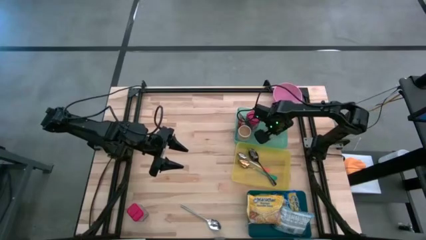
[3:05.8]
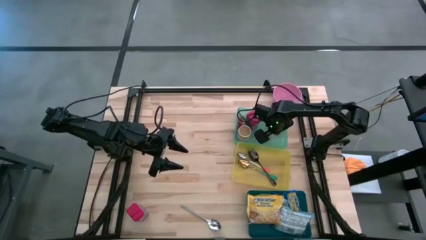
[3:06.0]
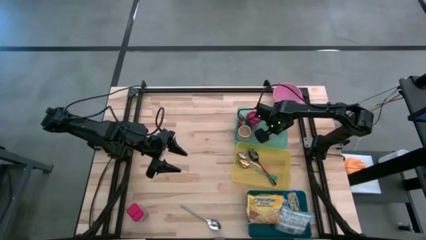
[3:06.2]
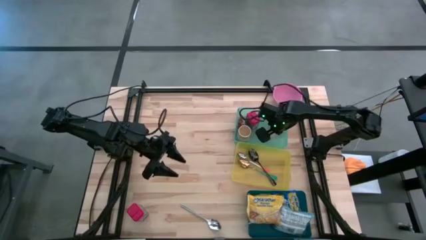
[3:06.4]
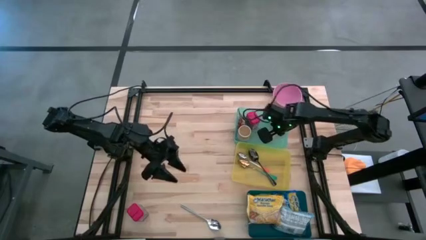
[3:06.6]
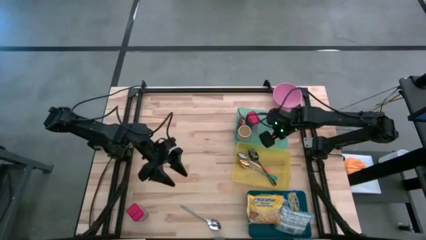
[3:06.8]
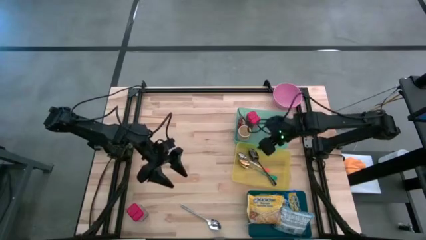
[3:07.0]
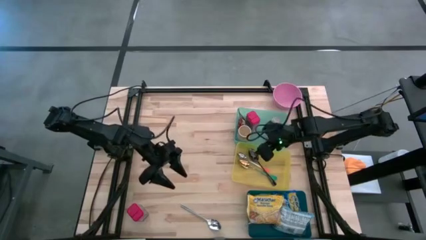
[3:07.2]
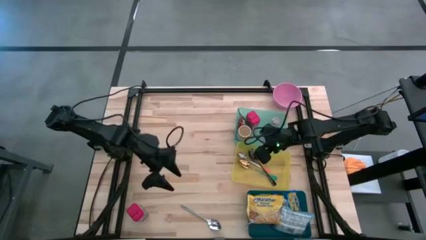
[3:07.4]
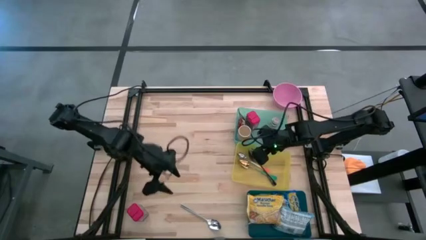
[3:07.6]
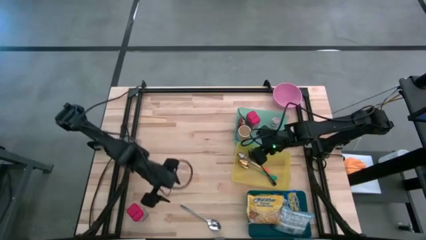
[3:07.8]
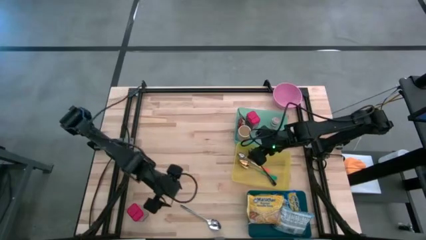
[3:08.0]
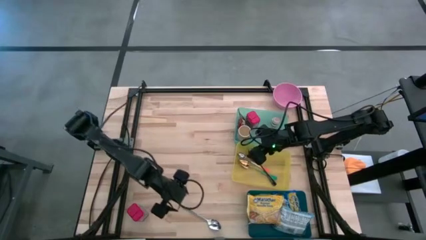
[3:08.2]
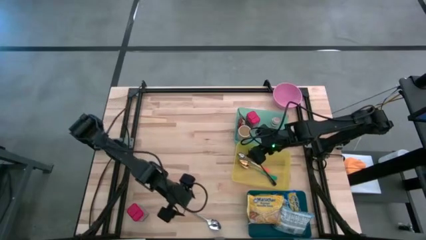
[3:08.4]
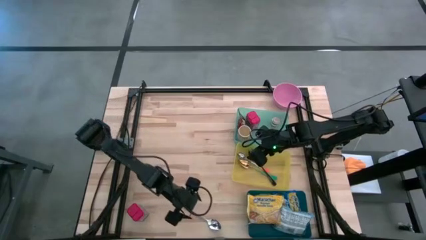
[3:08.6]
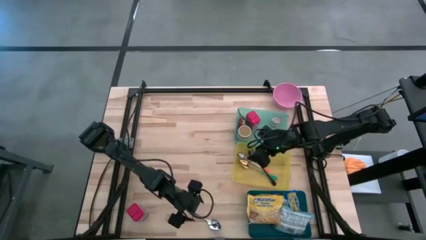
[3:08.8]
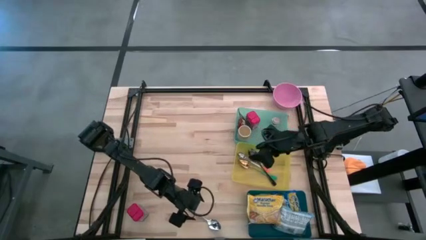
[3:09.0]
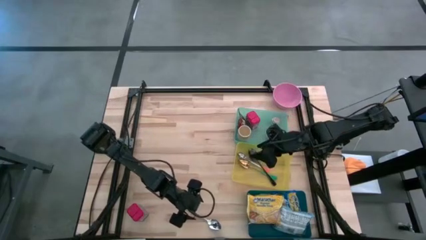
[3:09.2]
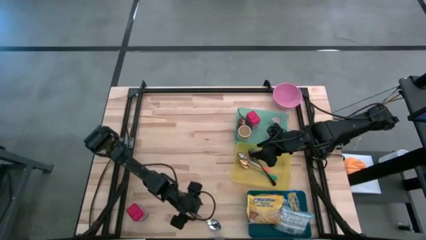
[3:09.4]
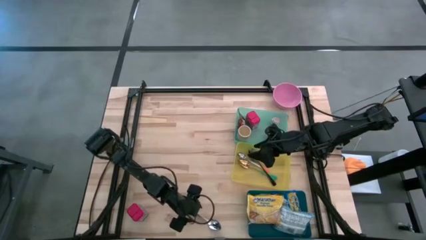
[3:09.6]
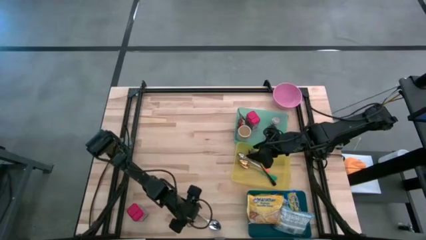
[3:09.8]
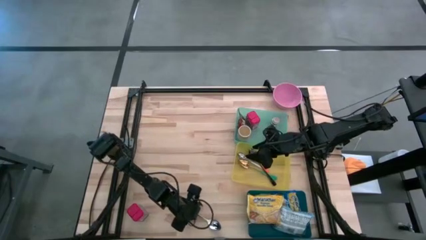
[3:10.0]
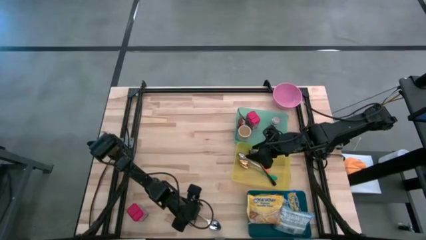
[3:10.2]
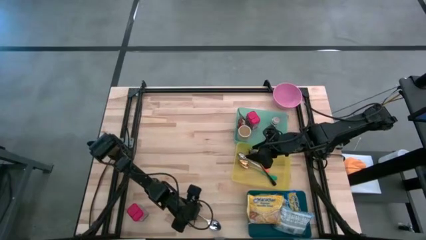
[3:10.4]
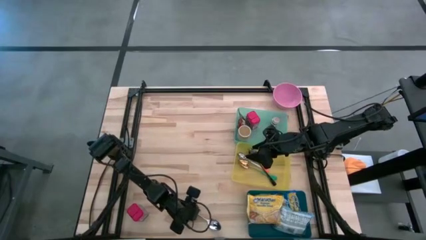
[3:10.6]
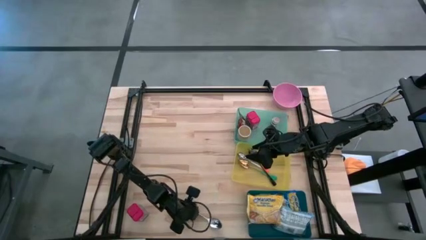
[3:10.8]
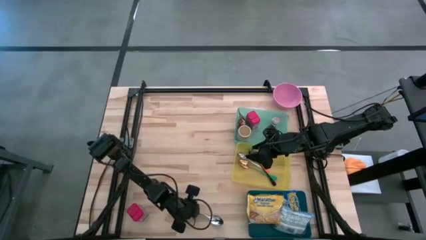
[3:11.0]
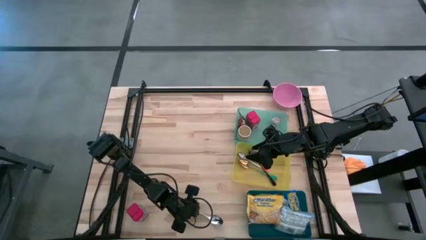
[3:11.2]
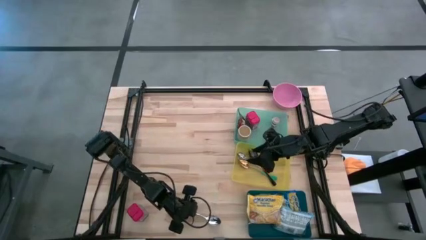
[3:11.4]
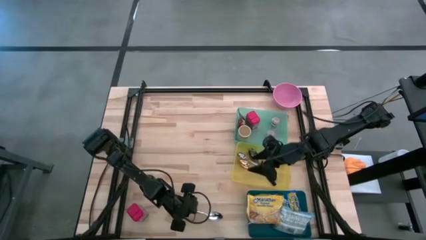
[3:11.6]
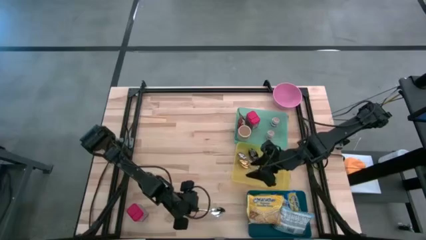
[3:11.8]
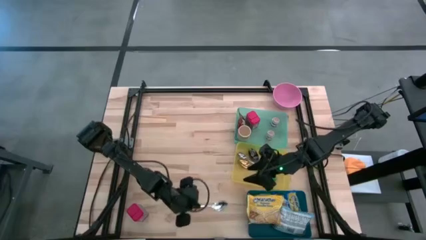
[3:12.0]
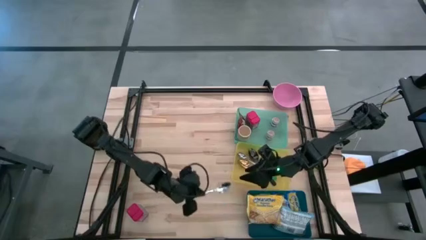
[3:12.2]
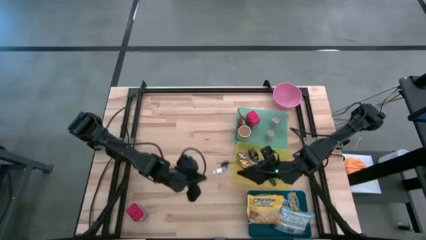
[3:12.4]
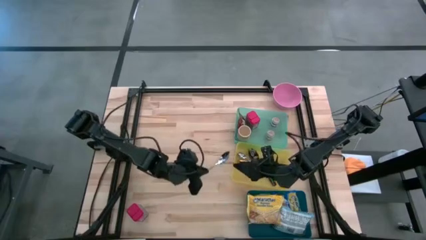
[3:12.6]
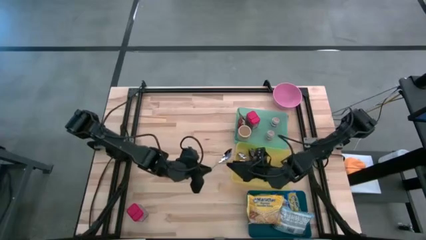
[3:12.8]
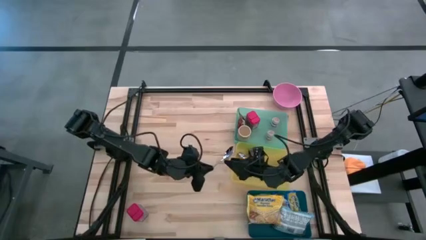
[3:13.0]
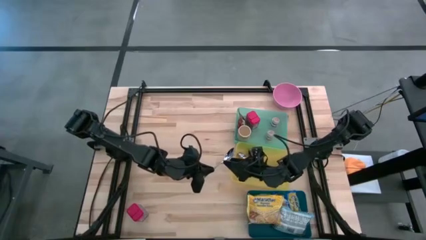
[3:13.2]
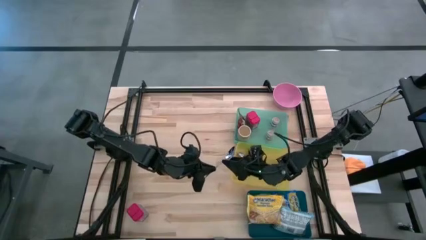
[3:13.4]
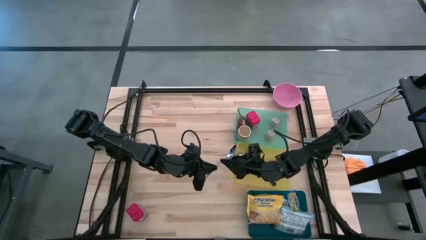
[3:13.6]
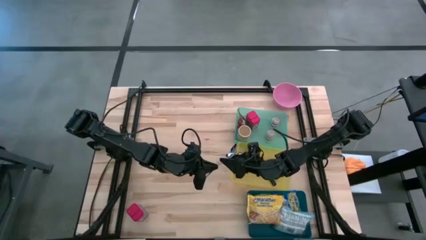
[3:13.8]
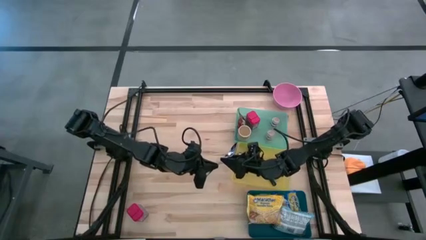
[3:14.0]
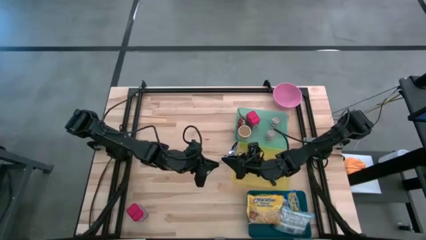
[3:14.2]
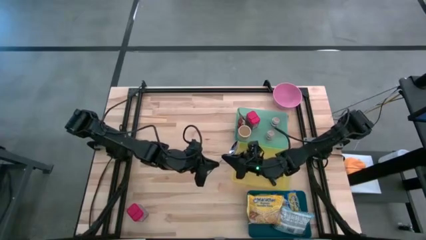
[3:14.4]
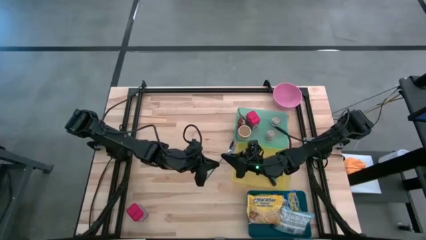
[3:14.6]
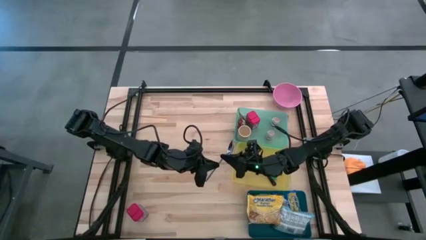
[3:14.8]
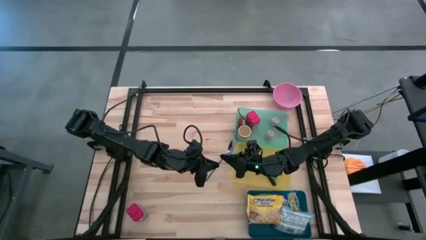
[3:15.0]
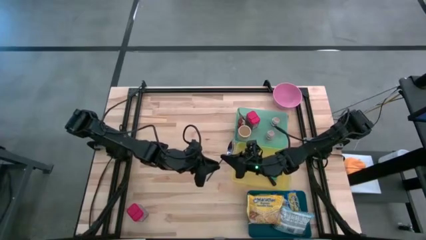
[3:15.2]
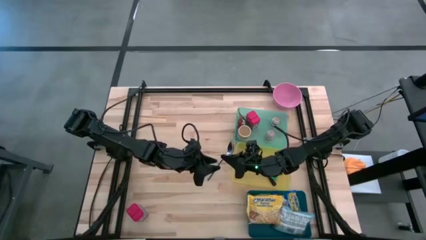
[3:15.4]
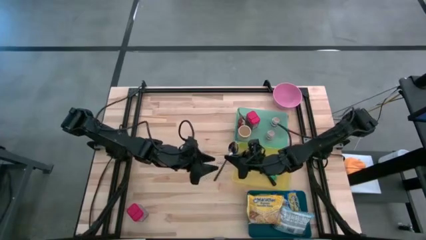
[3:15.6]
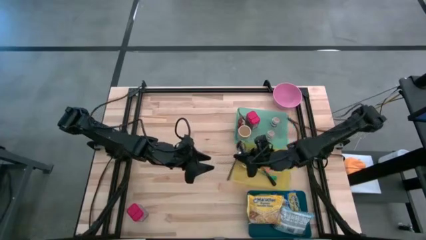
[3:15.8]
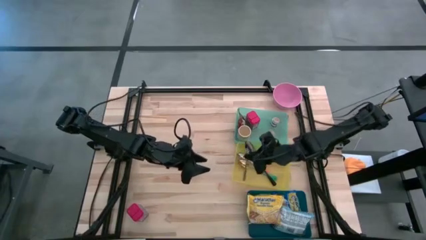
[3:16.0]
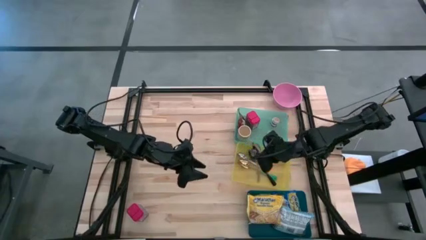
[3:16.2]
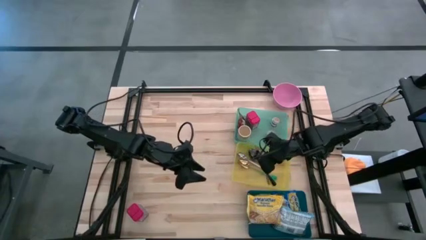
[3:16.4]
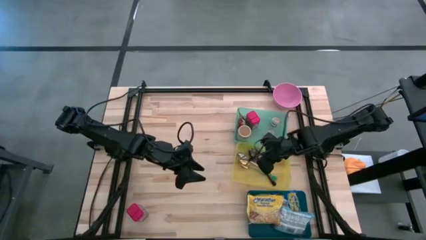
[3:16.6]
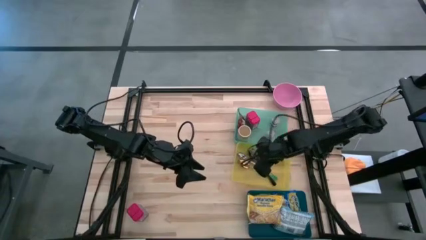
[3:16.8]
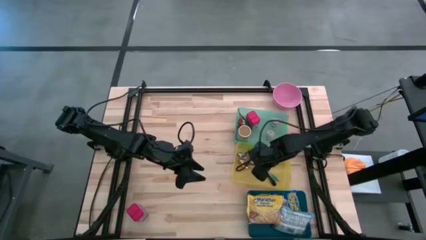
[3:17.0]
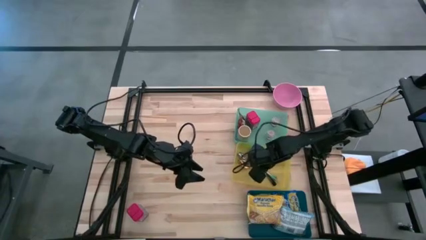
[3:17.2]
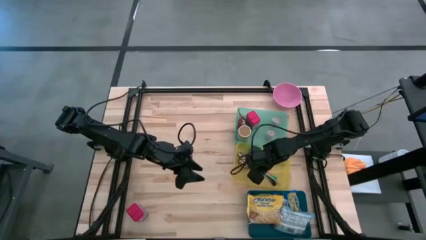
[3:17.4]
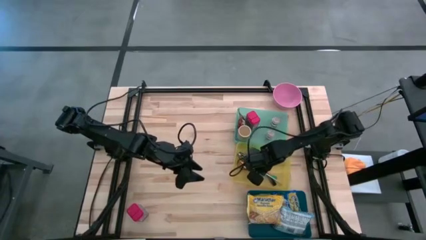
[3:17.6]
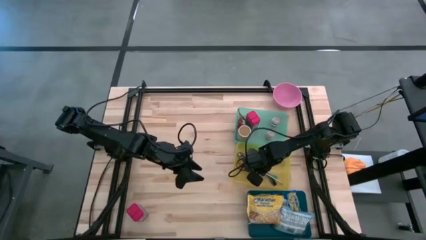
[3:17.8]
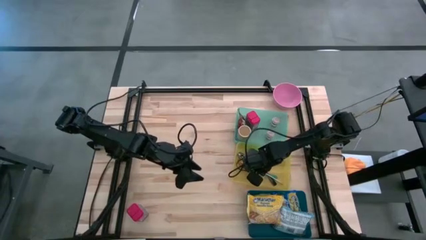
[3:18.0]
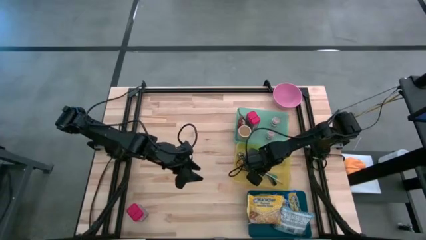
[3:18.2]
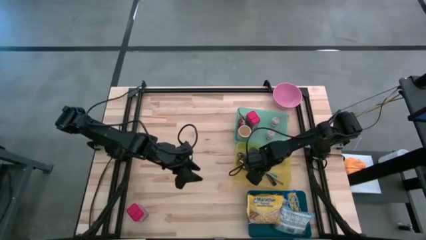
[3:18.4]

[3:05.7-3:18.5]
Put the silver spoon into the yellow bin
